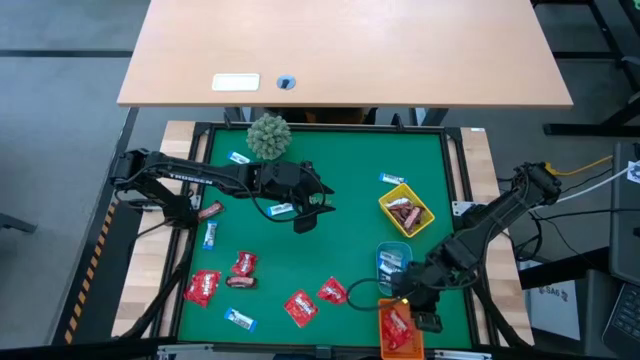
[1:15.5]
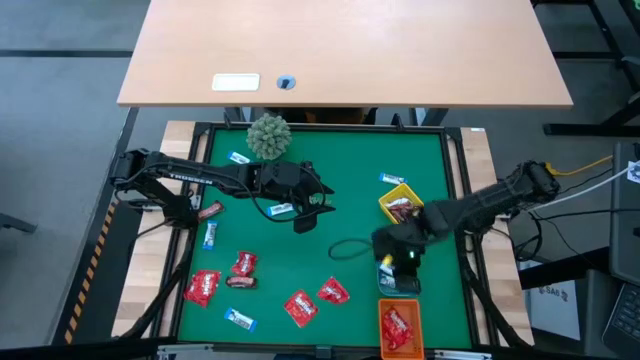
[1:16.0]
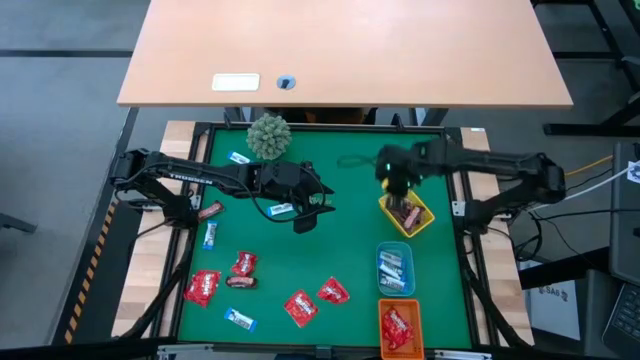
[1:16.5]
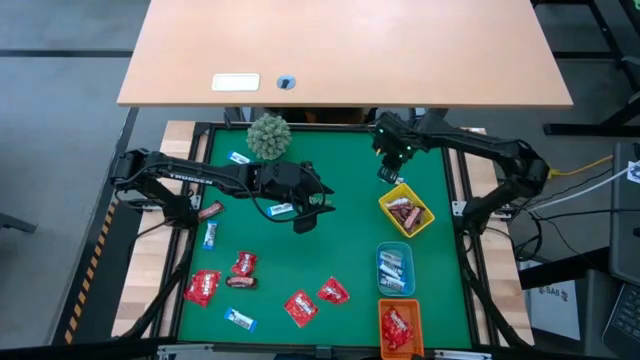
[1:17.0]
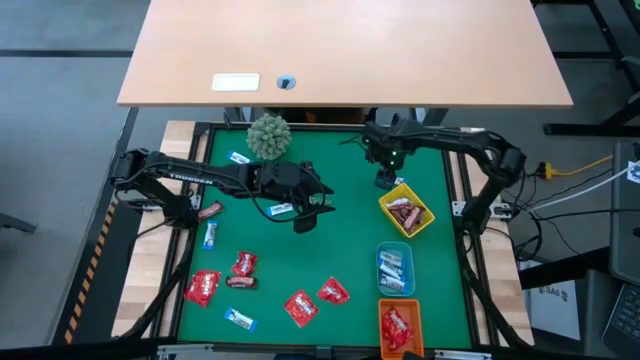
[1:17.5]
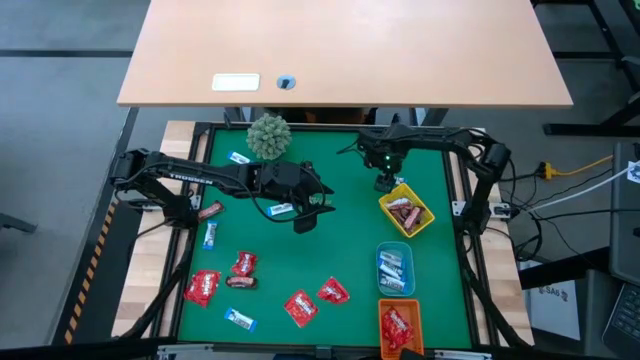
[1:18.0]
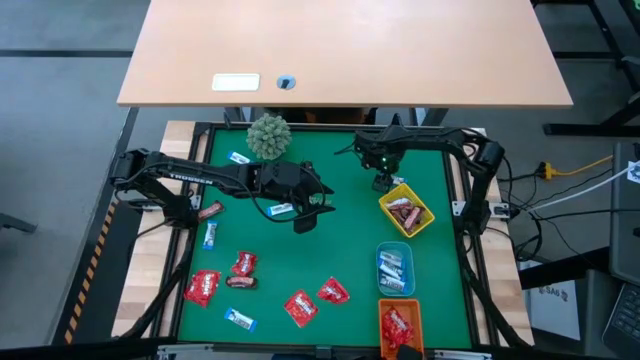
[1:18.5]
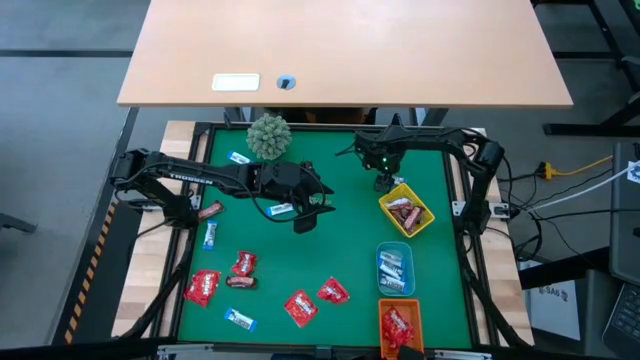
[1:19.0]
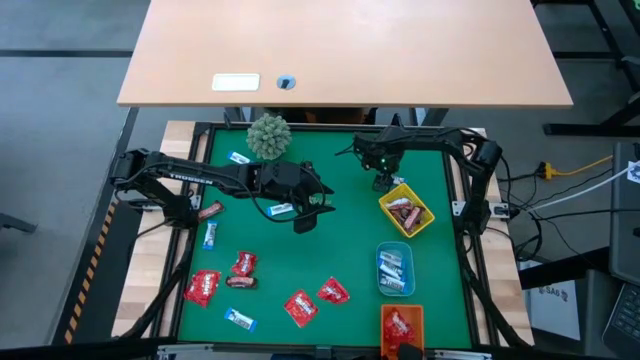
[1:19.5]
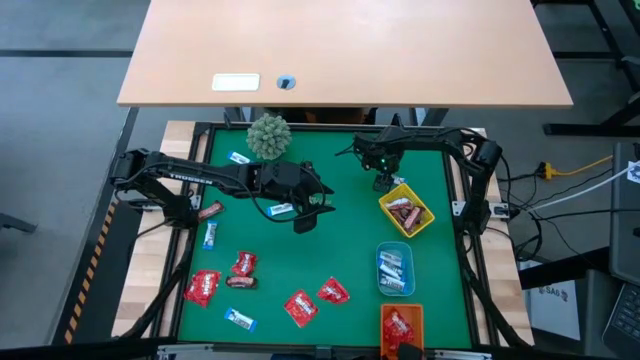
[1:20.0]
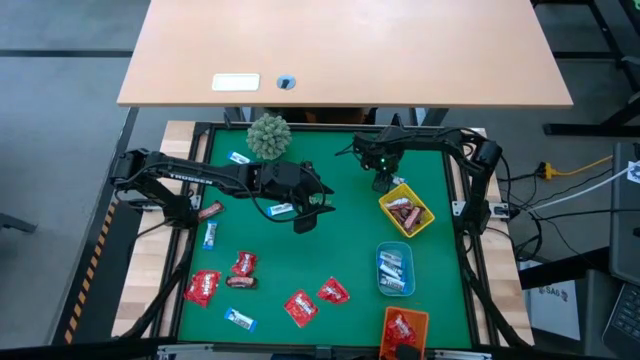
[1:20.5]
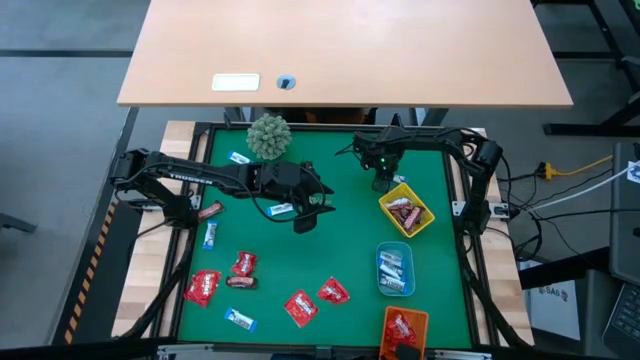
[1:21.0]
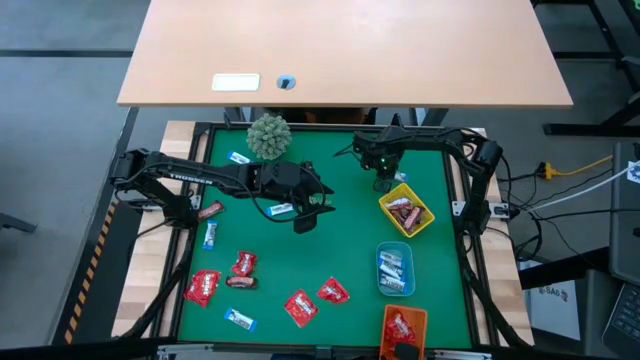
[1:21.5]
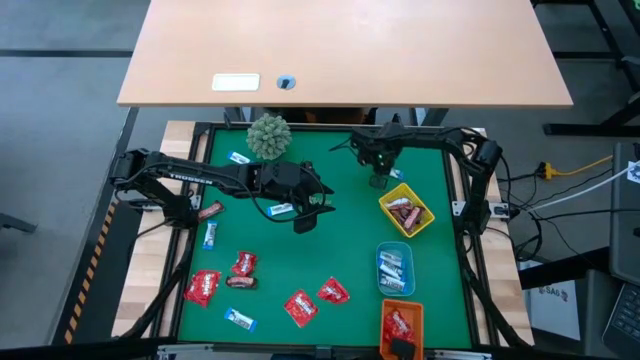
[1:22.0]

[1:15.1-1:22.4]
Task: Sort candy
Put the white chocolate into the blue bin

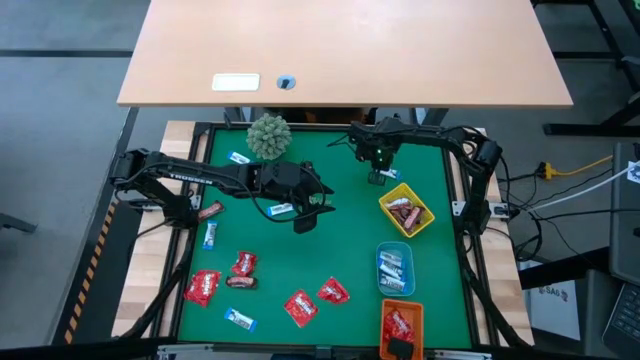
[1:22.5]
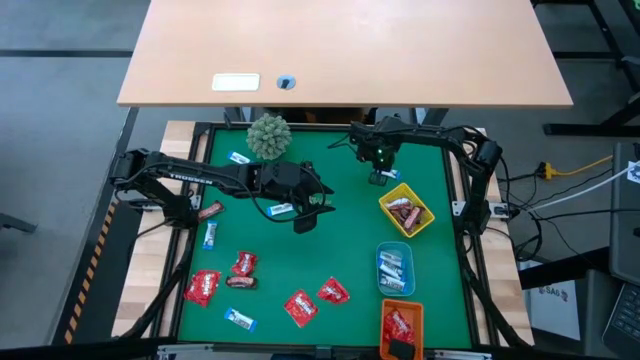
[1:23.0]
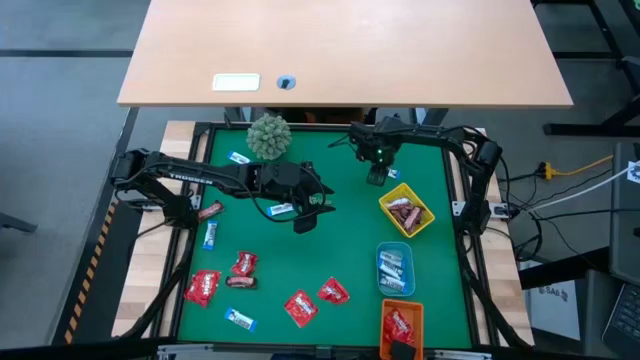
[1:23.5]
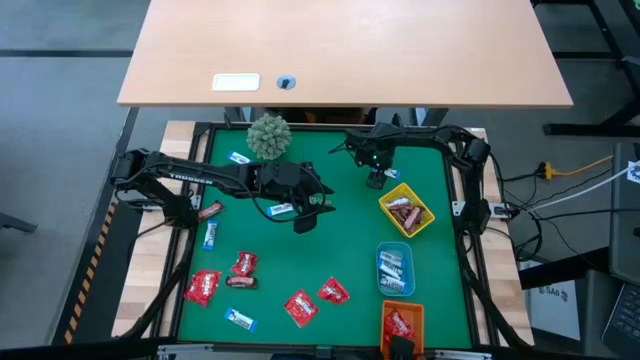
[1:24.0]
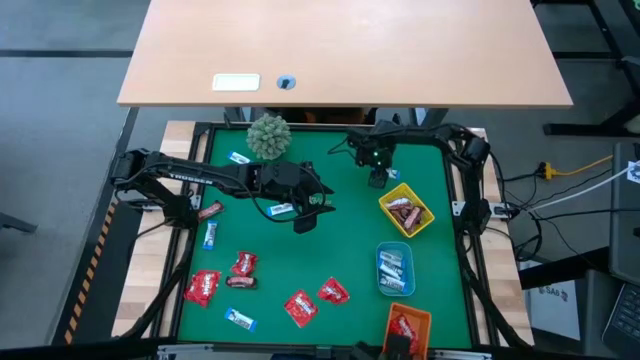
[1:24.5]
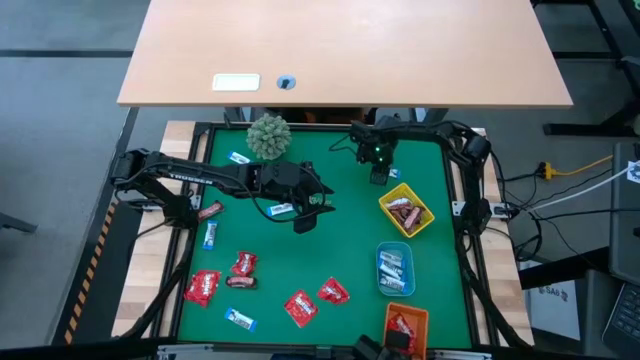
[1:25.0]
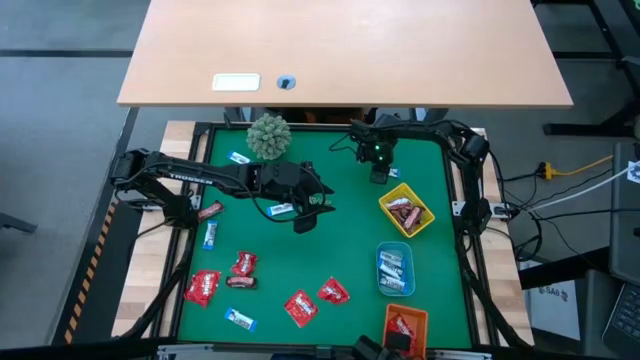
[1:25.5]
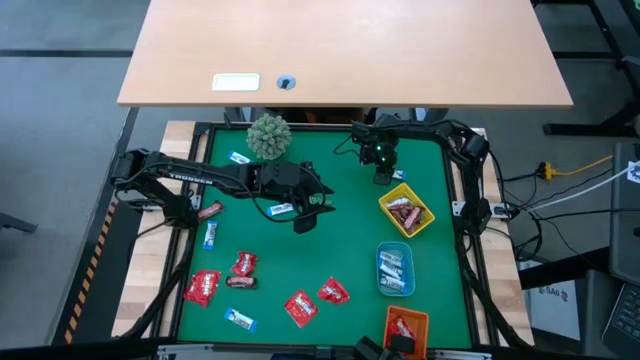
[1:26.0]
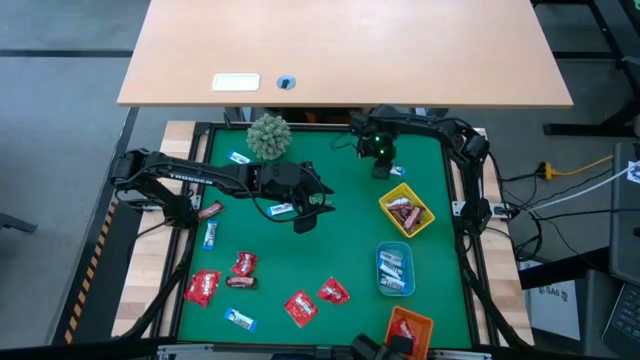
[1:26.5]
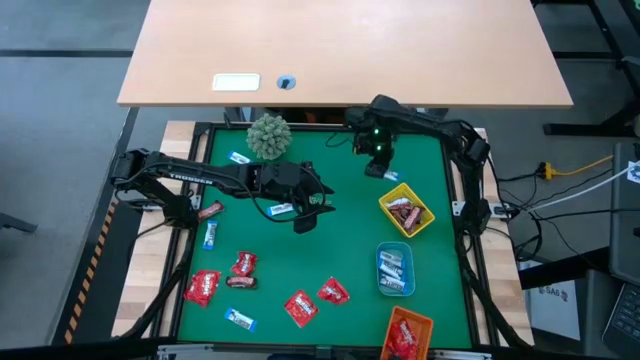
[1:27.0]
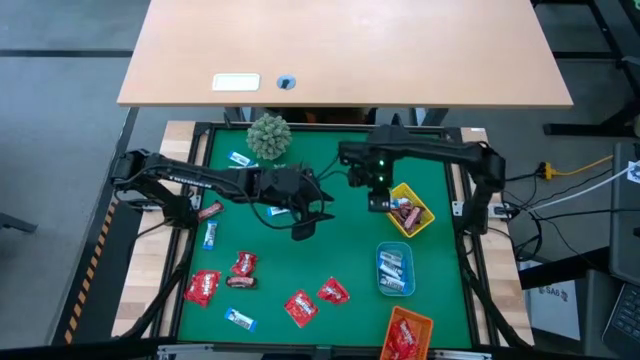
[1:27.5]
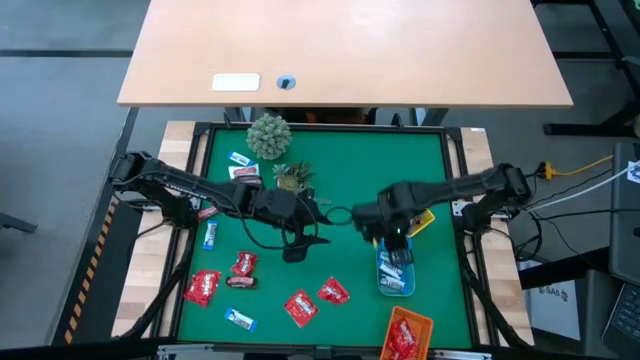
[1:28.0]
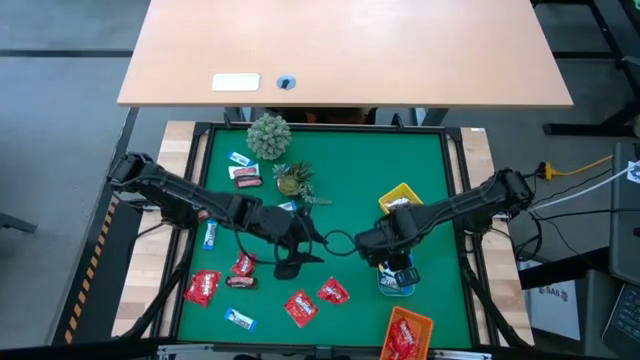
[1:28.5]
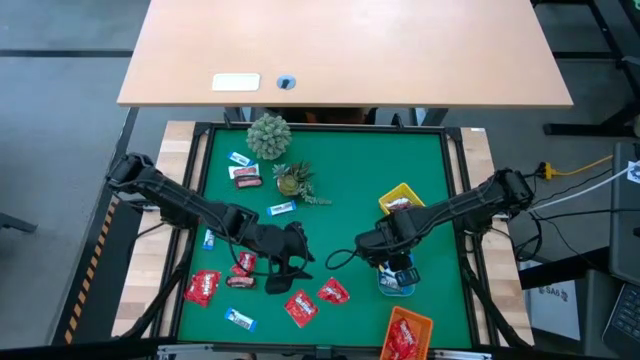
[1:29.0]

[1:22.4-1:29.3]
Put the white chocolate into the blue bin

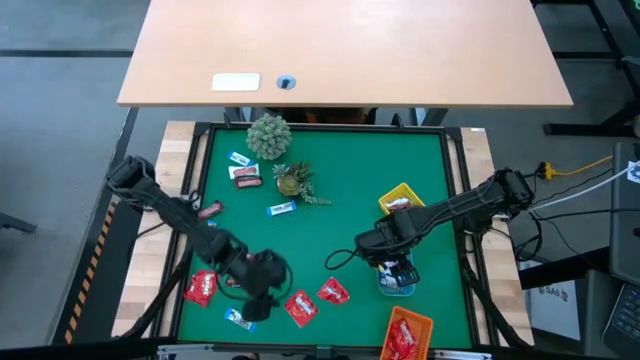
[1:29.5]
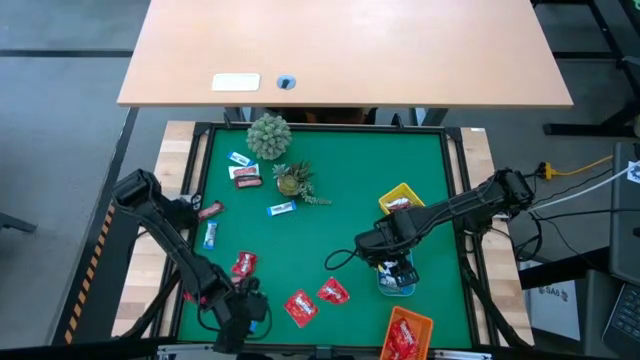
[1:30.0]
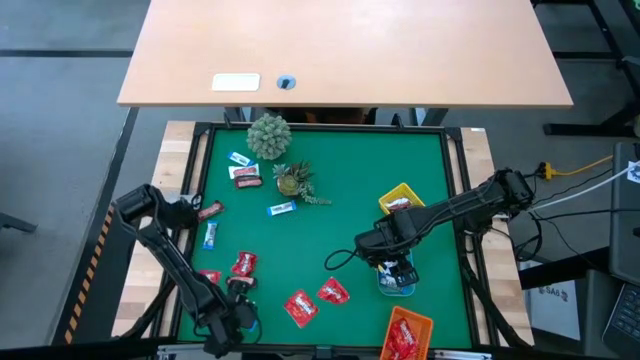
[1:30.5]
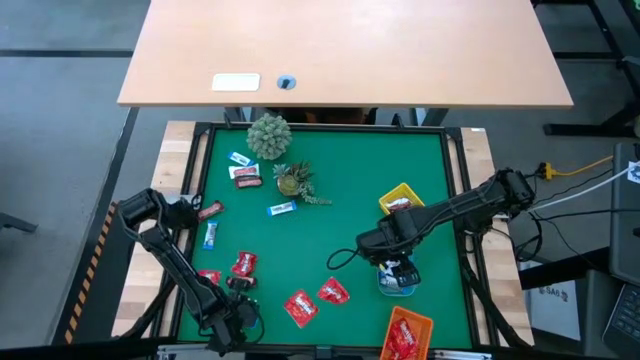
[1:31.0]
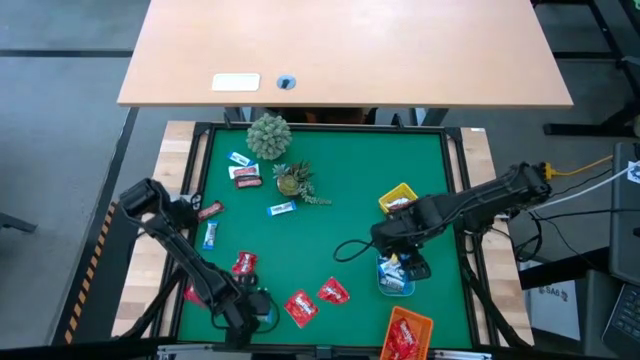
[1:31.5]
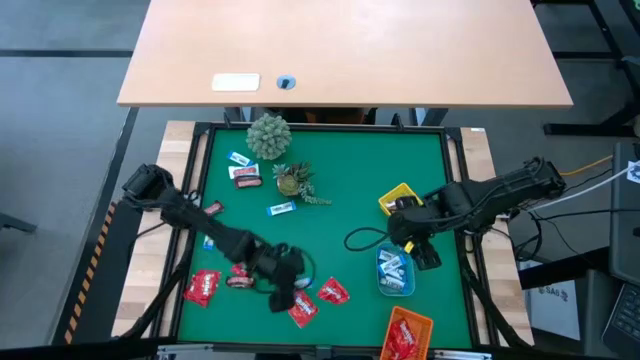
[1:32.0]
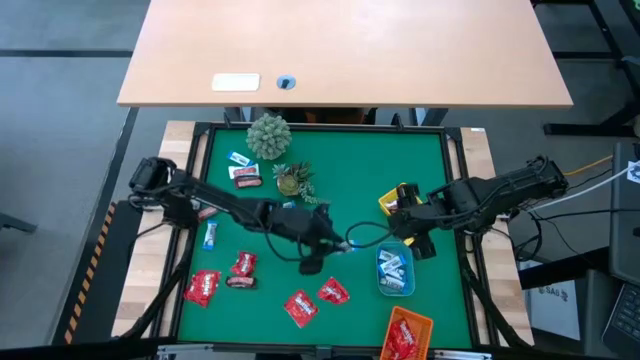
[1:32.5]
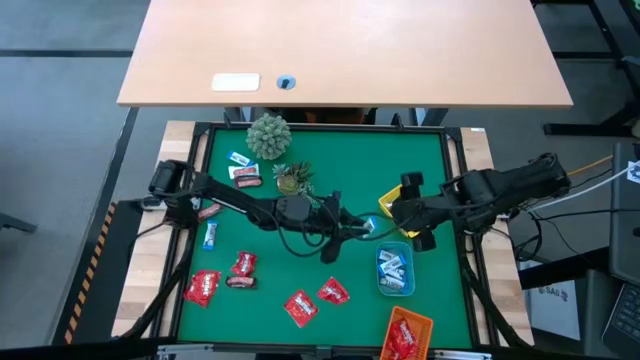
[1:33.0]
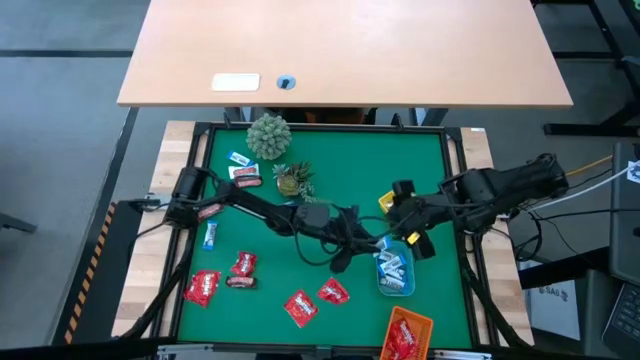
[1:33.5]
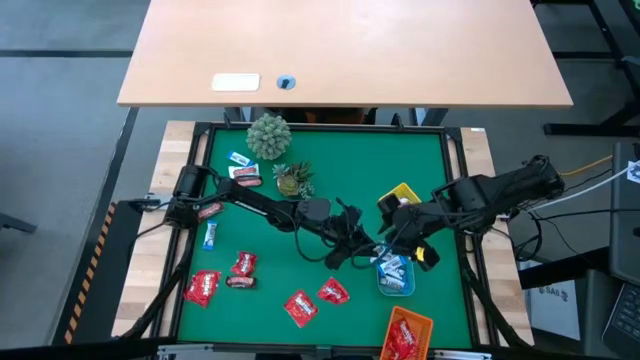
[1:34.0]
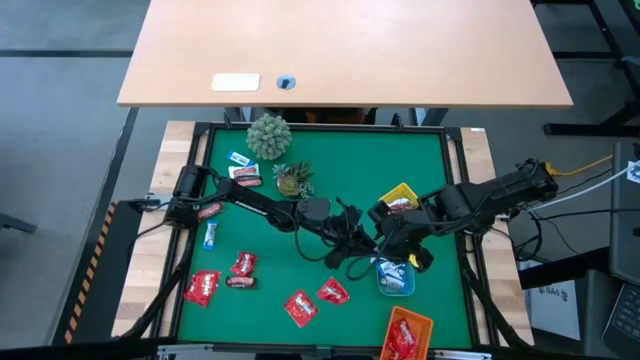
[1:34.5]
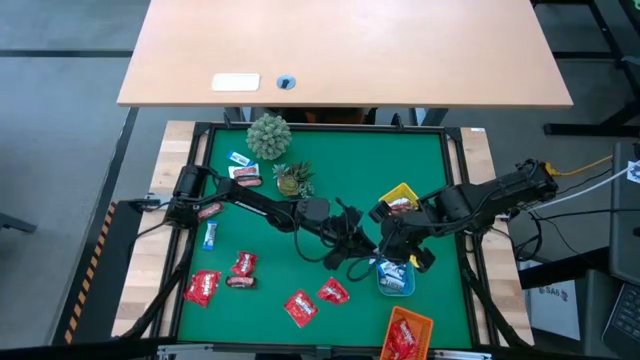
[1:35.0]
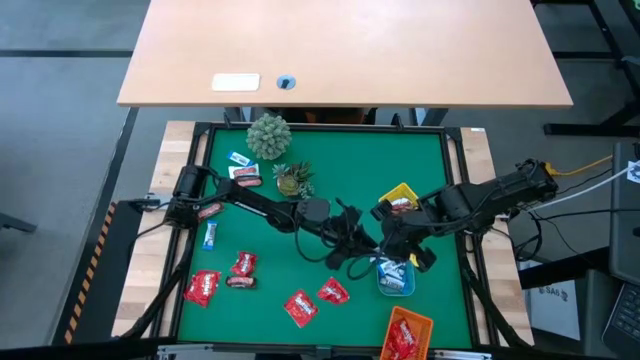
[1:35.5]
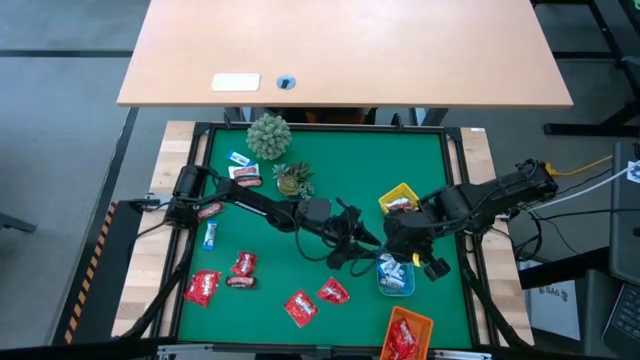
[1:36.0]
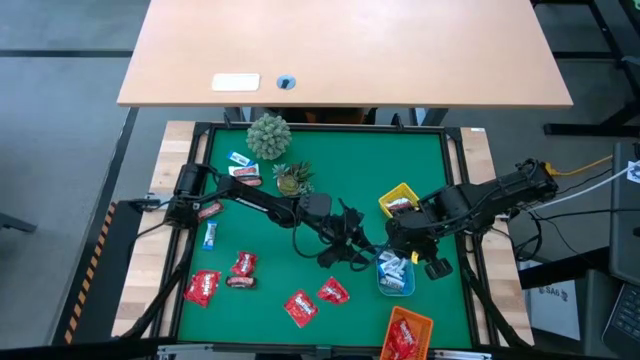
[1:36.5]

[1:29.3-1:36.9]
Put the white chocolate into the blue bin
